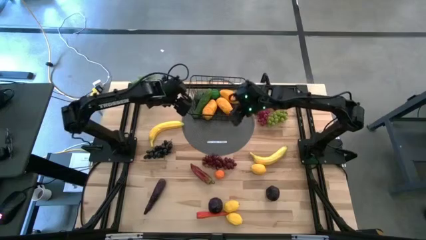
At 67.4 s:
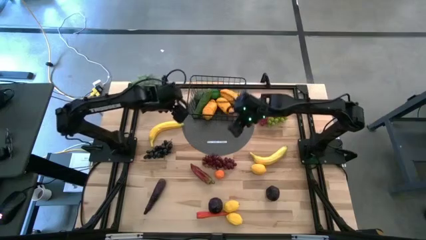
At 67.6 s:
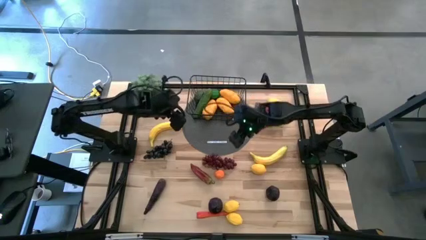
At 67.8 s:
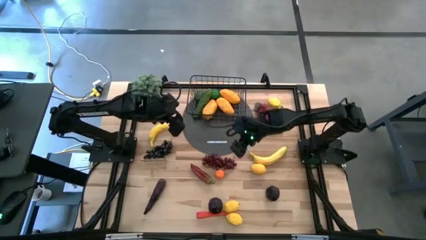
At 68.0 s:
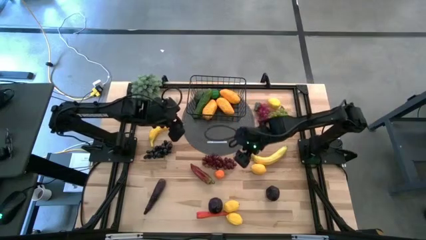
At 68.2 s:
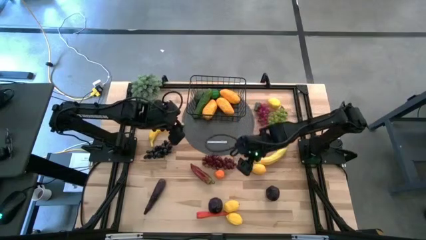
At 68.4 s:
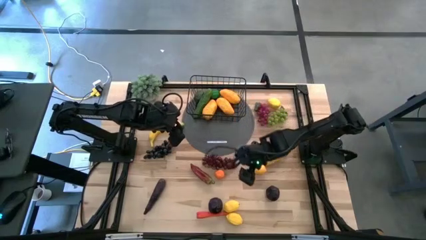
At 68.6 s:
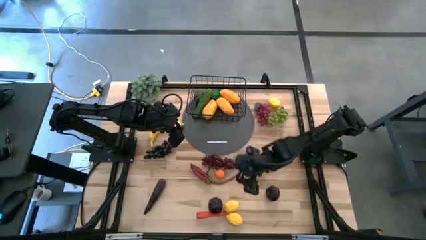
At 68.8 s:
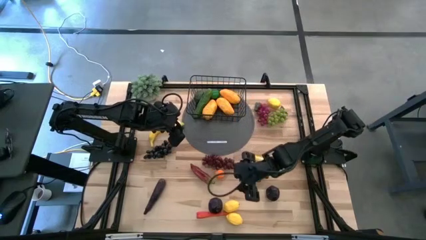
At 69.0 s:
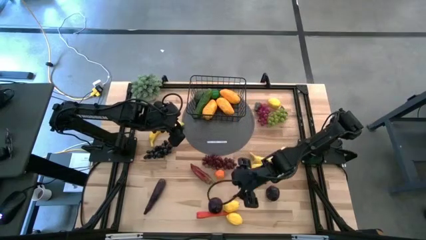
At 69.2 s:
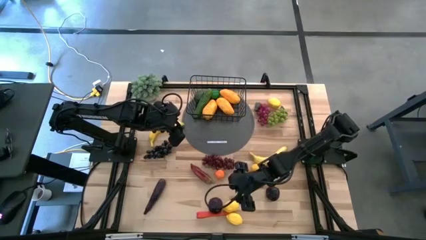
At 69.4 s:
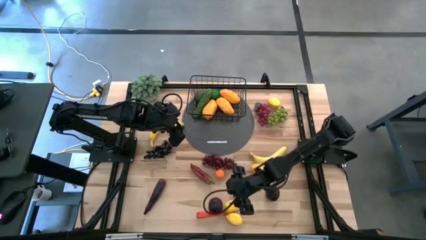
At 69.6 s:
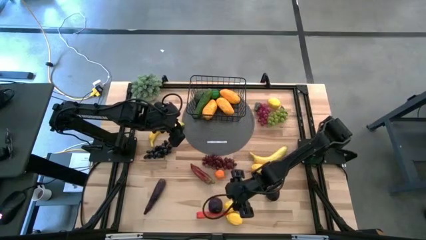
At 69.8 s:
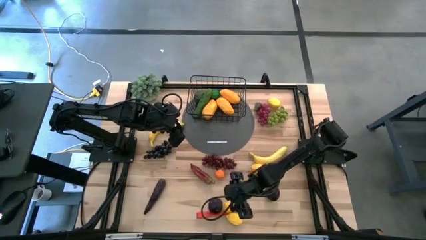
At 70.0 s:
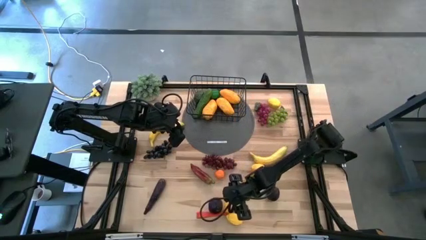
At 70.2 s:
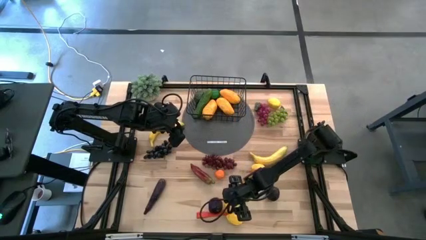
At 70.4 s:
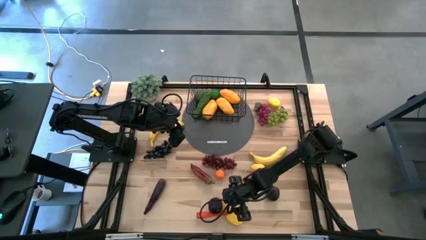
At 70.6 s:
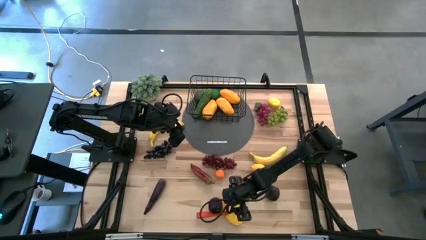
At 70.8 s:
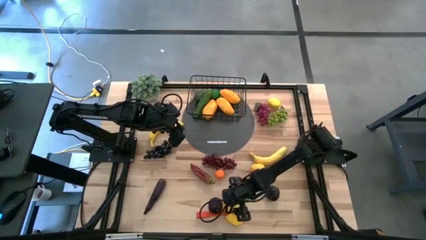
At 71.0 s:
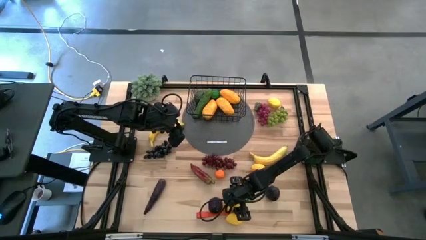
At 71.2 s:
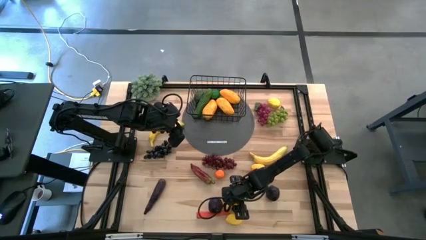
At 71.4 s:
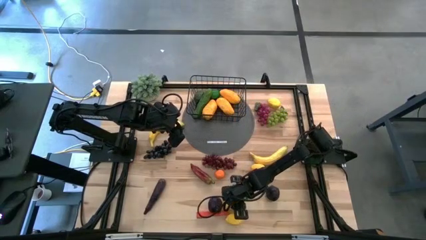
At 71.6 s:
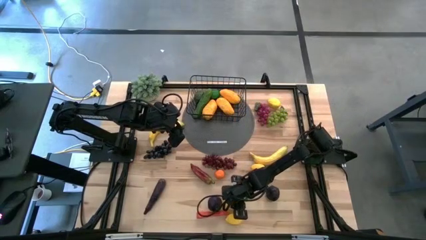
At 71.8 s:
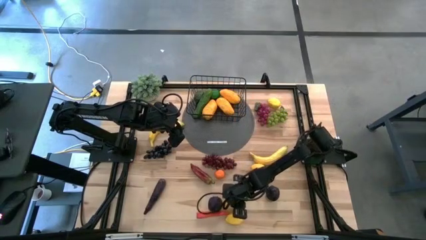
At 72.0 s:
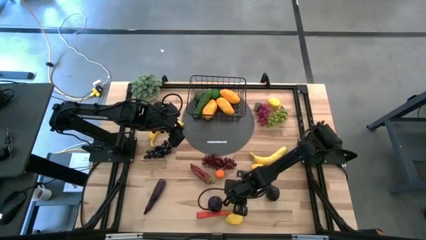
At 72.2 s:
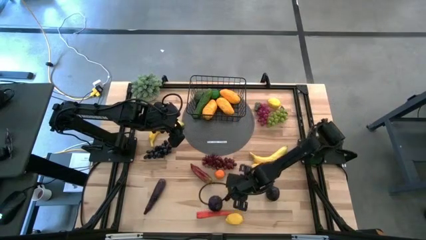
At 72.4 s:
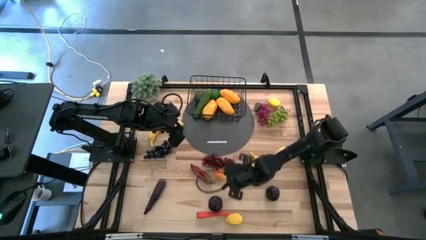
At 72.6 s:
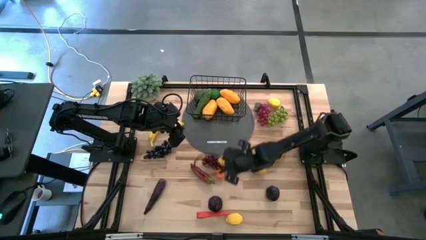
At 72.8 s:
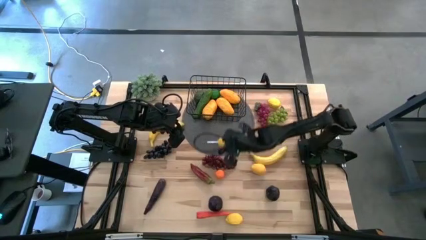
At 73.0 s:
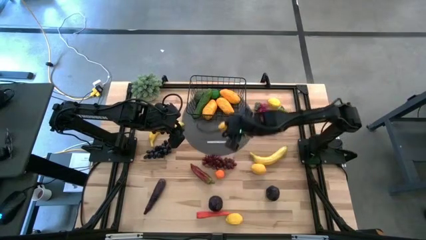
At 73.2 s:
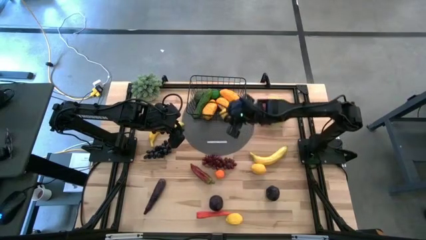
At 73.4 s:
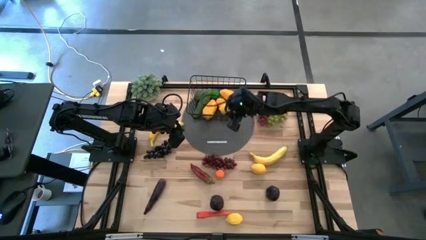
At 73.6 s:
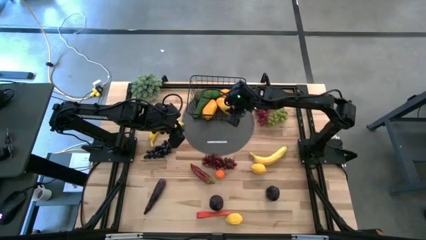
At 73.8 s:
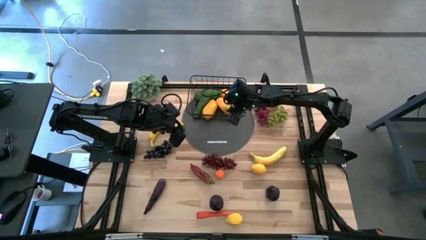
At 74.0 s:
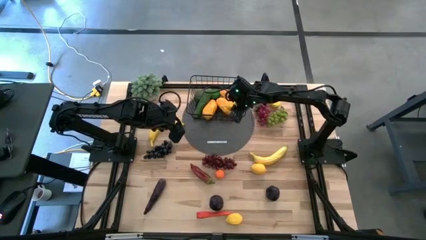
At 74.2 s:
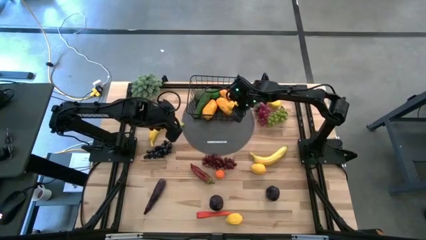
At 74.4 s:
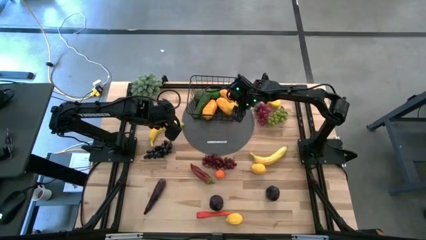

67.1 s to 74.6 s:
Task: Build produce basket
Put the bottom left yellow lemon into the black wire basket

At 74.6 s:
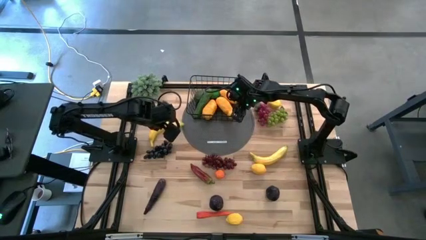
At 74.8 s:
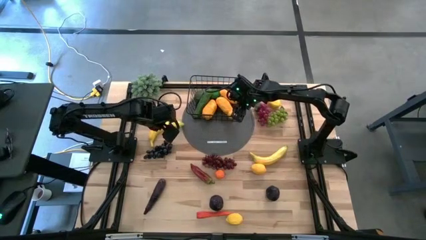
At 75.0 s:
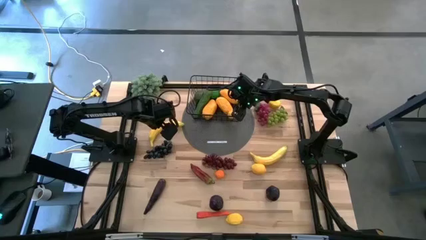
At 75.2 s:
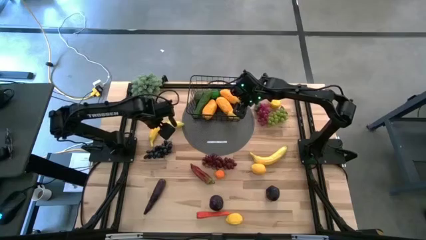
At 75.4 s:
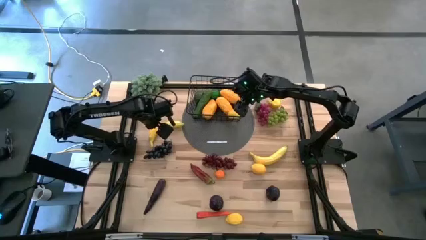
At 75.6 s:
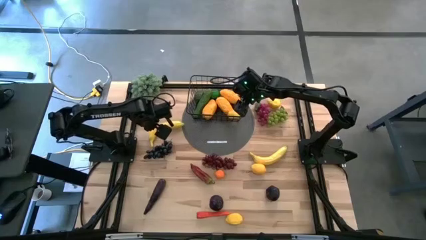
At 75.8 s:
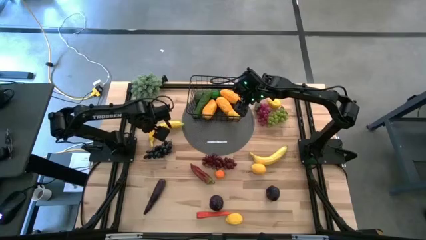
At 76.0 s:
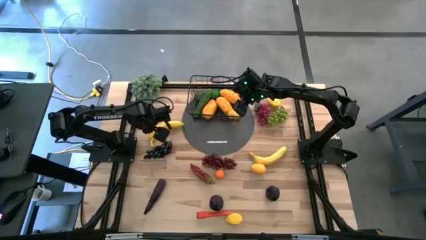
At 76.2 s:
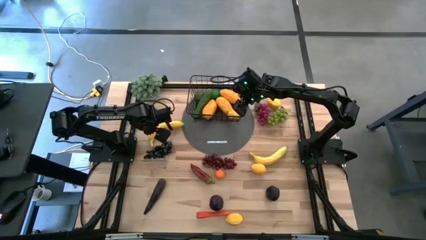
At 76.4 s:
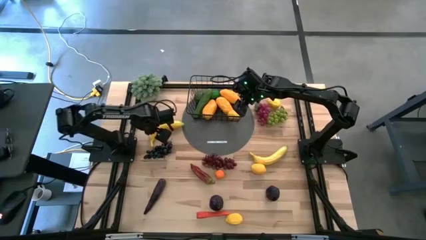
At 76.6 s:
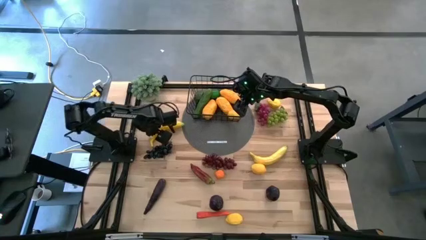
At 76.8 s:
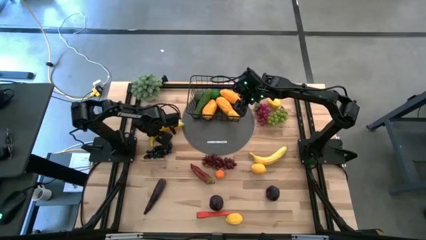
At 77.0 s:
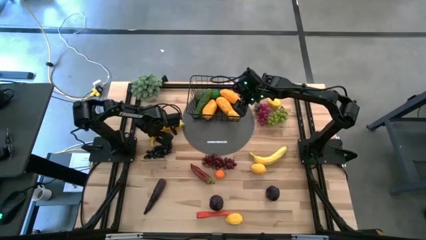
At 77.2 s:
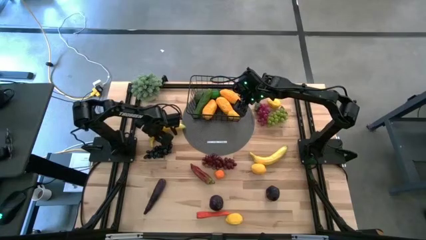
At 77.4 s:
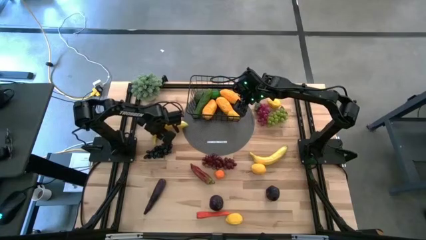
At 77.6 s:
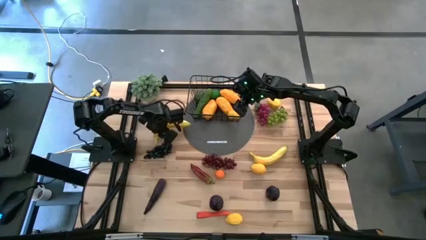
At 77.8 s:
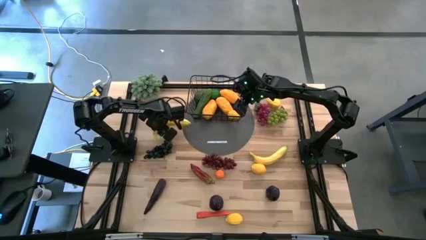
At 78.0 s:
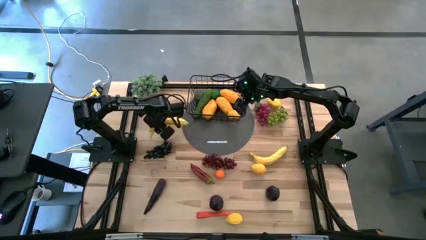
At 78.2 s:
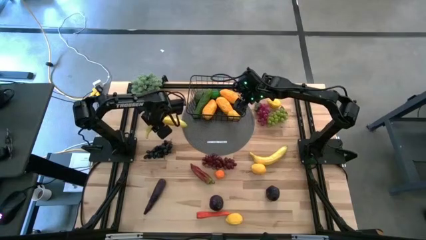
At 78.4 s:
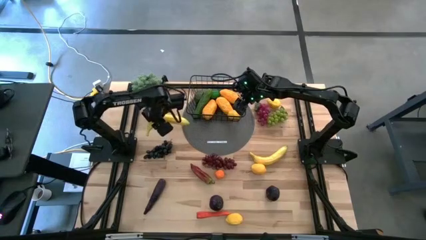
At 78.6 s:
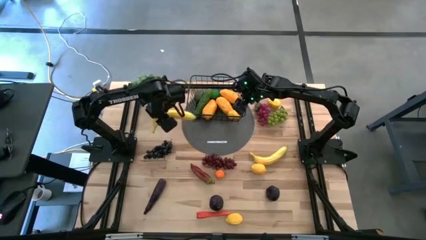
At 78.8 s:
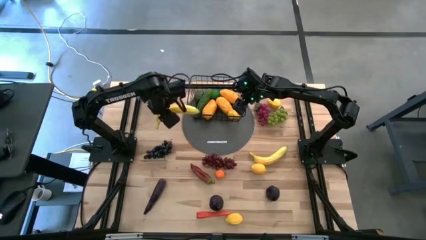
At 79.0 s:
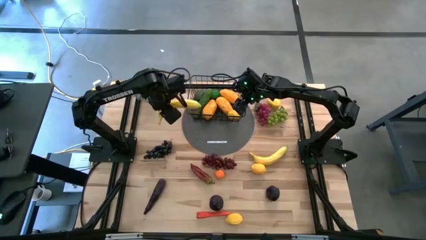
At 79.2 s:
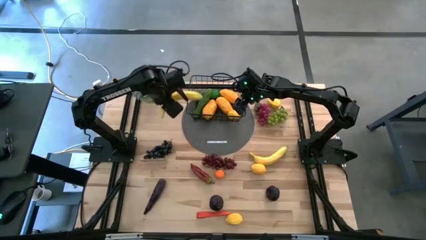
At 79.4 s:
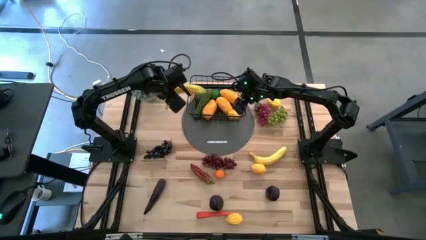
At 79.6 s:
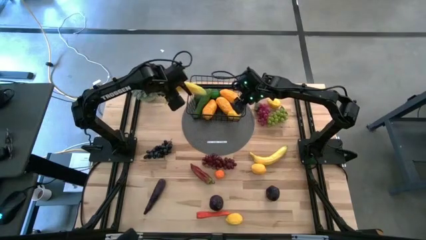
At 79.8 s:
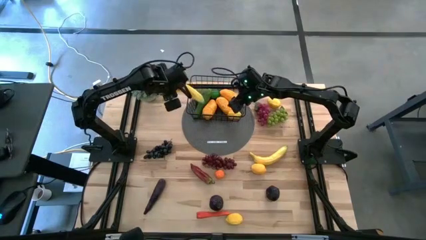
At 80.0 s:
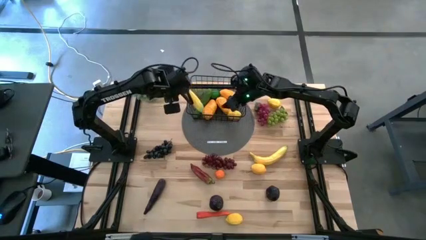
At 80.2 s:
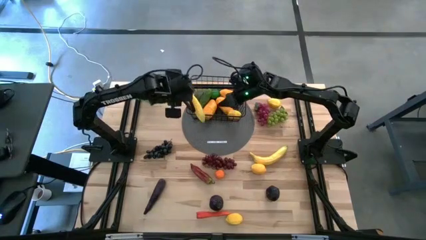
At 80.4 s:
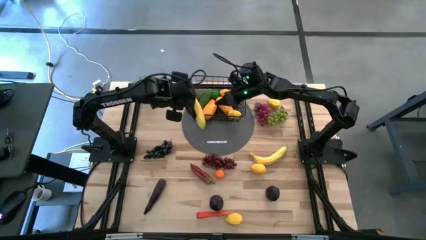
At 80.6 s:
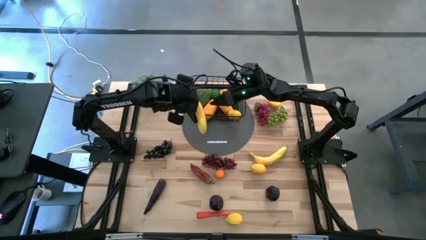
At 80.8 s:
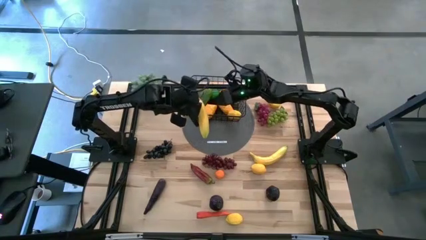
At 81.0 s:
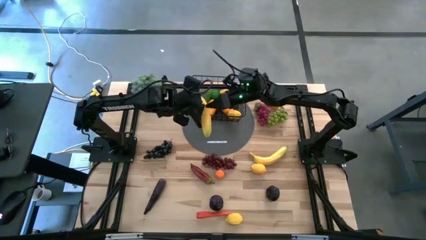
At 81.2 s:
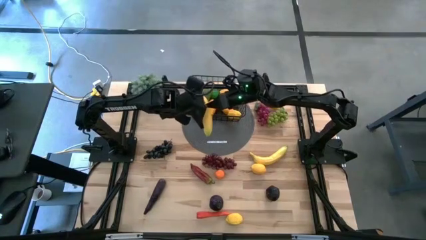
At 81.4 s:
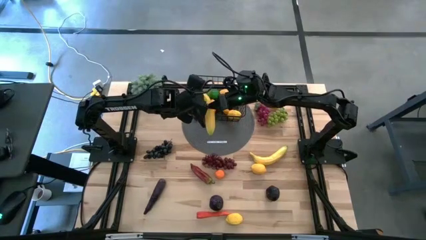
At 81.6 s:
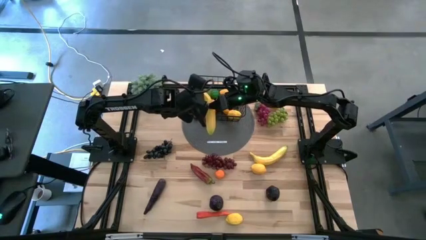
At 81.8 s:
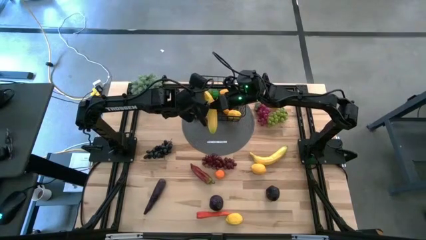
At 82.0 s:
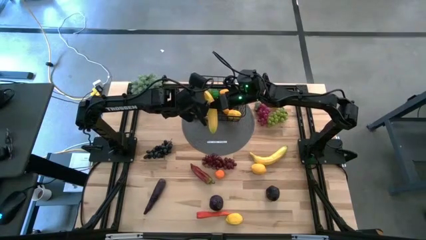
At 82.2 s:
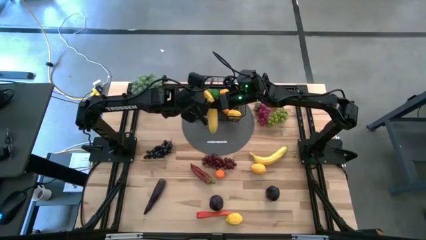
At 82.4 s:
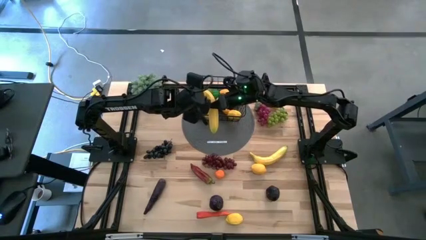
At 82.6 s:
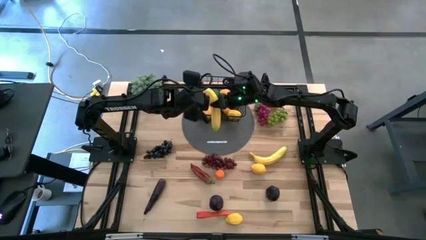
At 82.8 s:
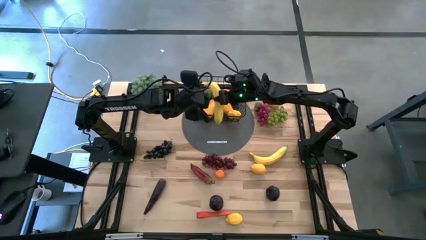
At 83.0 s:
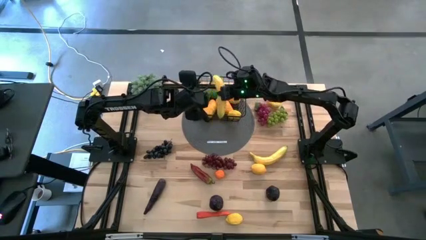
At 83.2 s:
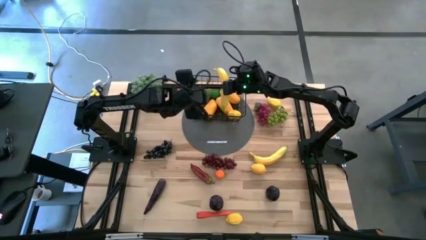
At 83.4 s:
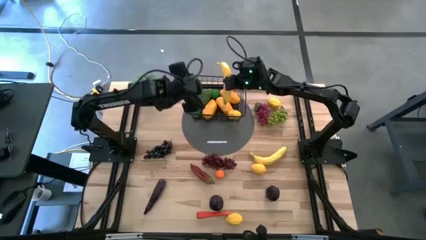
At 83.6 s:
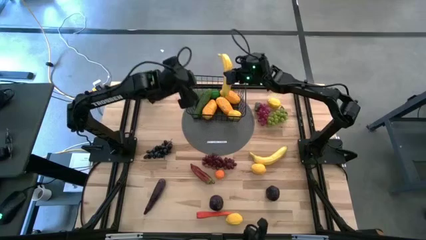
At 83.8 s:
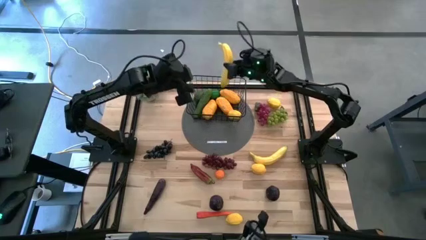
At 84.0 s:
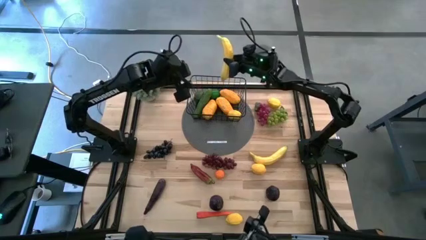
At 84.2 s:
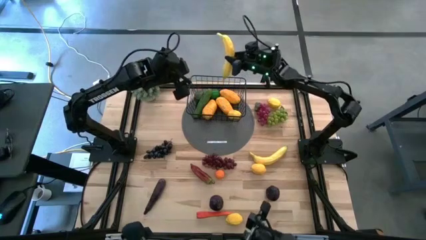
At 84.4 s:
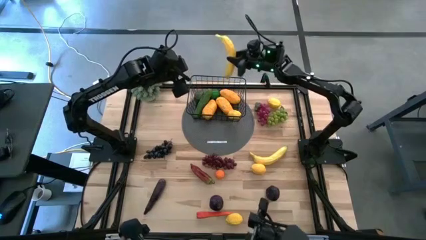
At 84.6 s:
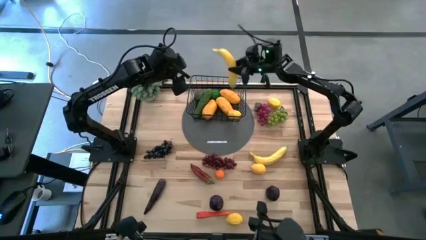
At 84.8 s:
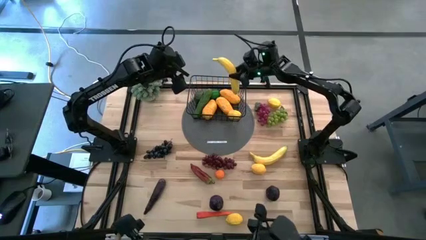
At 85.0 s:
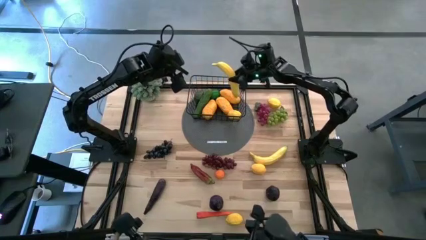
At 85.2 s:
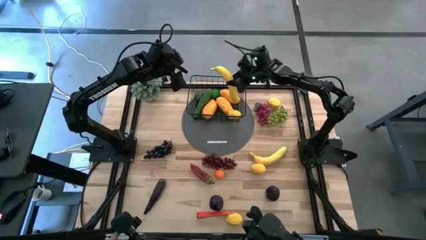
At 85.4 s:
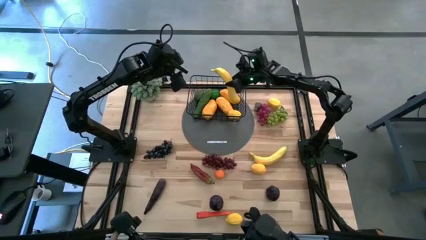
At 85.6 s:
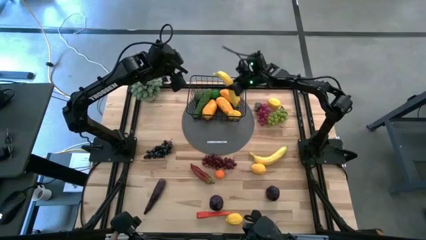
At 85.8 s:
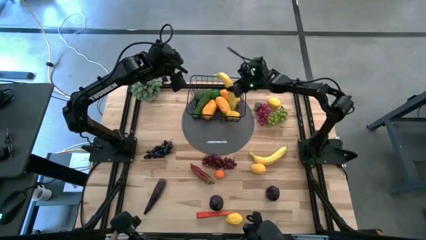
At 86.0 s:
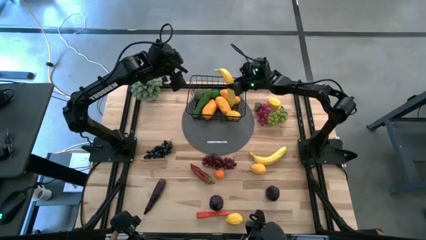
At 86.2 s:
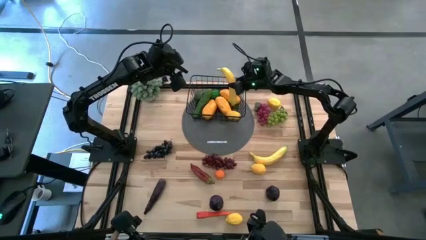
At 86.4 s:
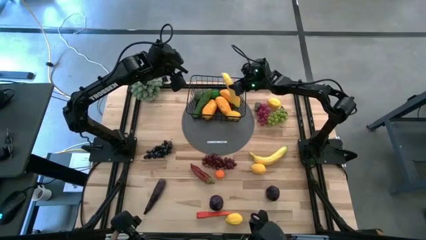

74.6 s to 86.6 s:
Put the left yellow banana into the black wire basket
